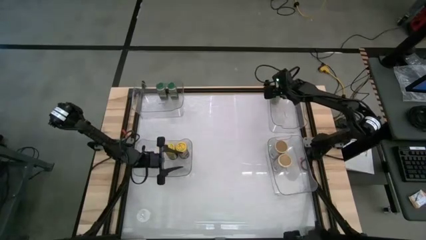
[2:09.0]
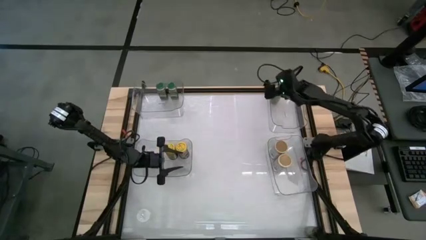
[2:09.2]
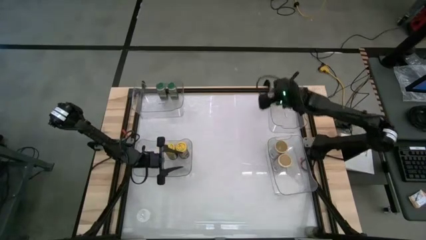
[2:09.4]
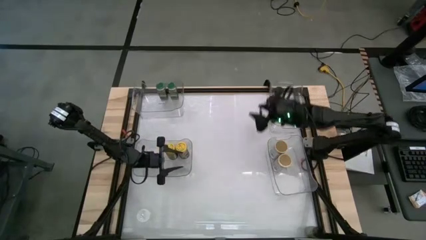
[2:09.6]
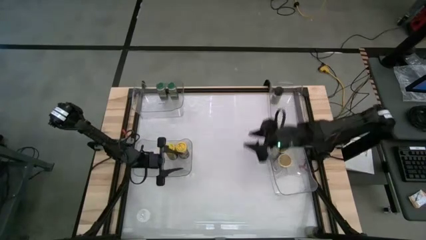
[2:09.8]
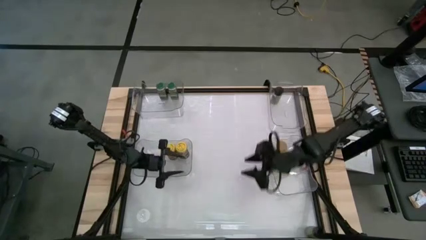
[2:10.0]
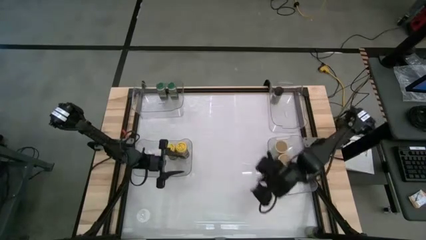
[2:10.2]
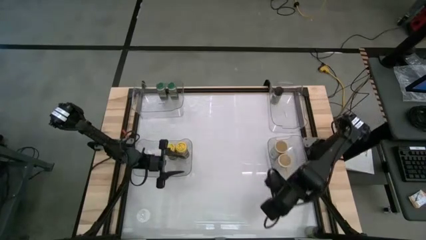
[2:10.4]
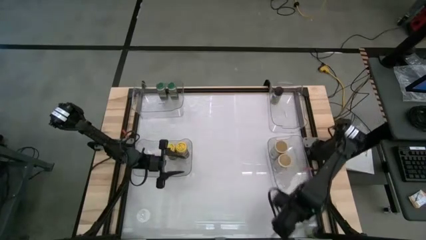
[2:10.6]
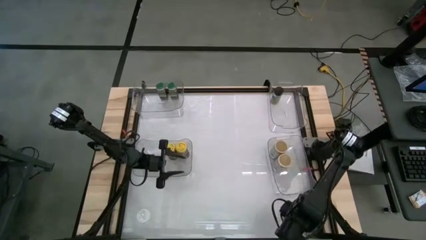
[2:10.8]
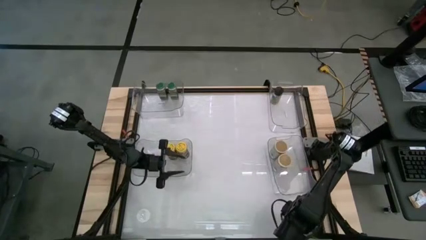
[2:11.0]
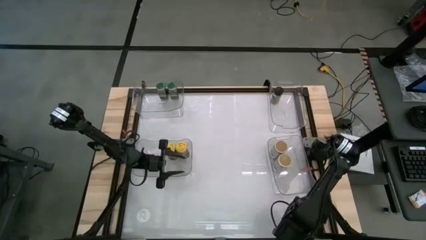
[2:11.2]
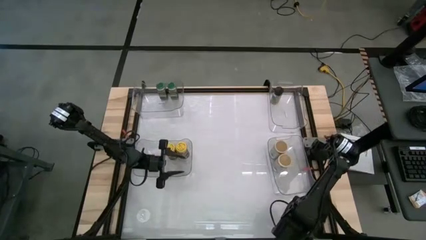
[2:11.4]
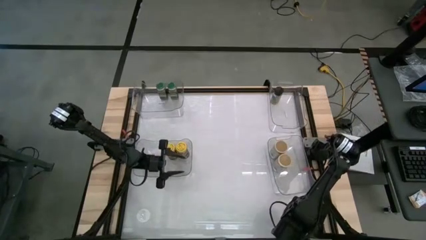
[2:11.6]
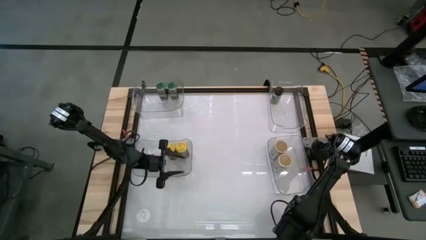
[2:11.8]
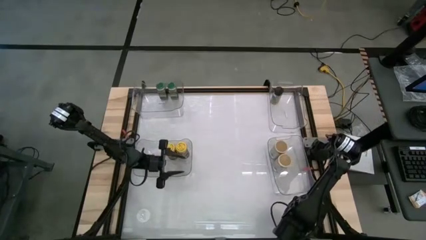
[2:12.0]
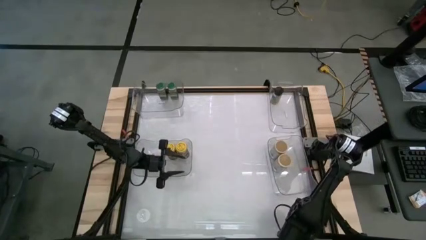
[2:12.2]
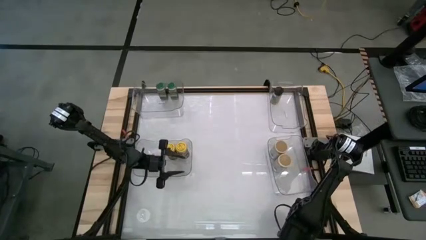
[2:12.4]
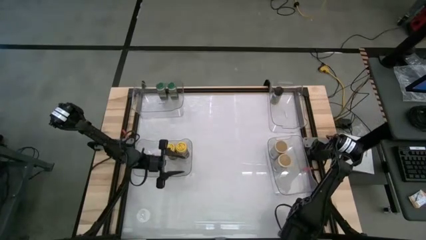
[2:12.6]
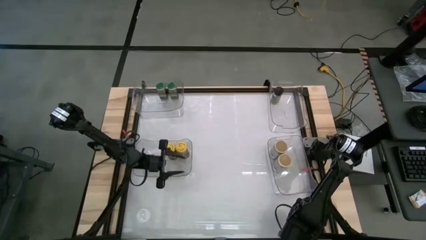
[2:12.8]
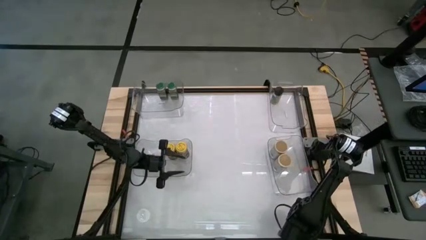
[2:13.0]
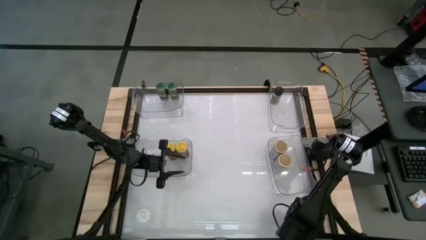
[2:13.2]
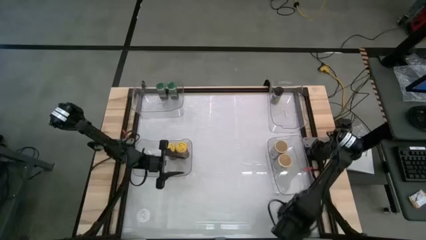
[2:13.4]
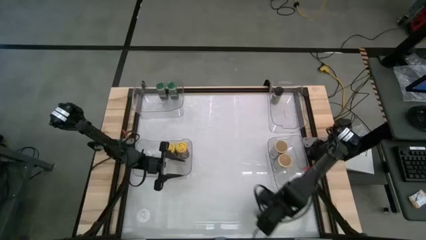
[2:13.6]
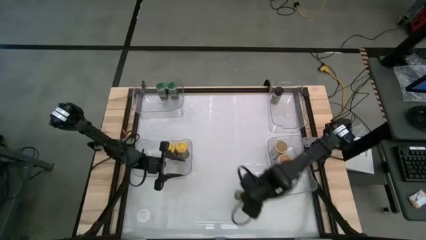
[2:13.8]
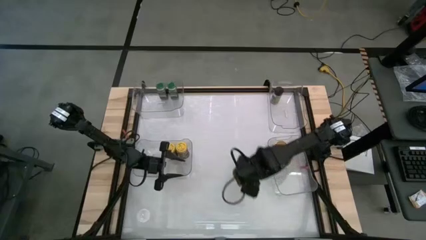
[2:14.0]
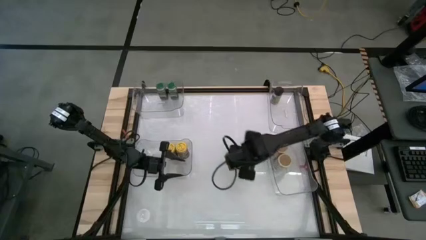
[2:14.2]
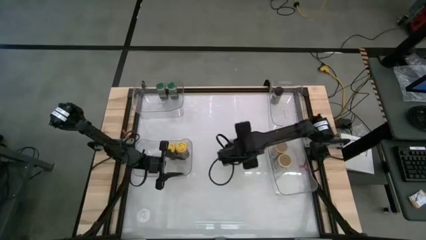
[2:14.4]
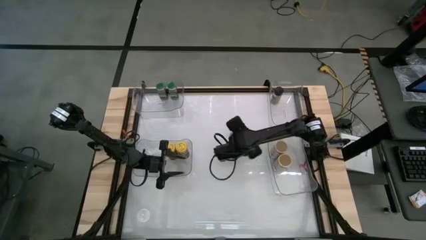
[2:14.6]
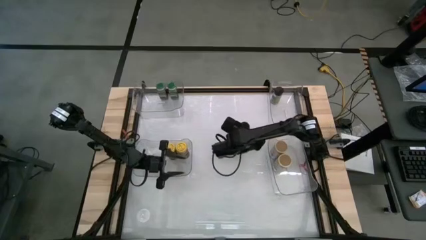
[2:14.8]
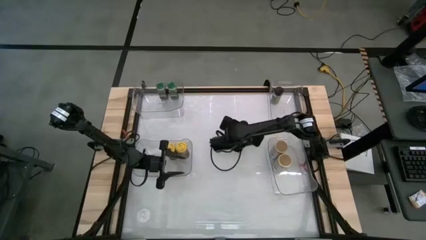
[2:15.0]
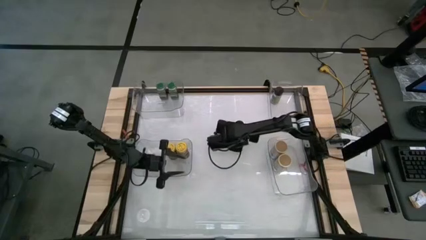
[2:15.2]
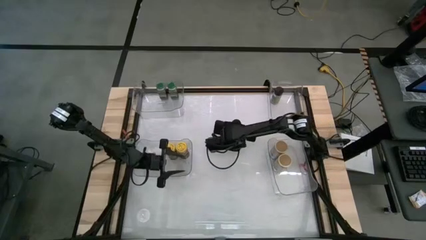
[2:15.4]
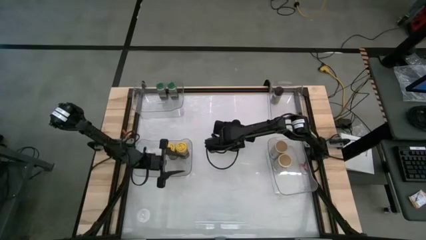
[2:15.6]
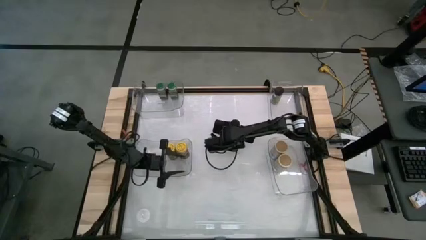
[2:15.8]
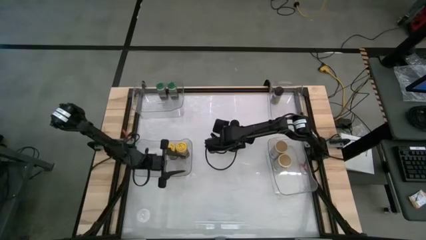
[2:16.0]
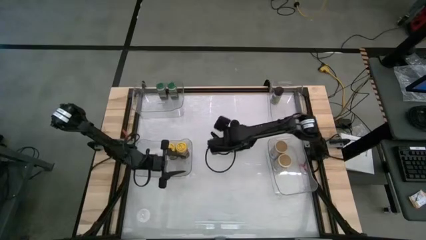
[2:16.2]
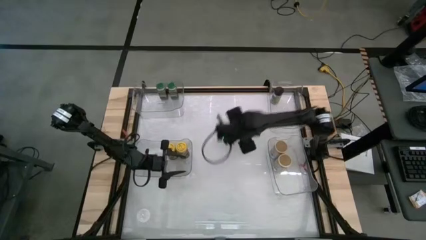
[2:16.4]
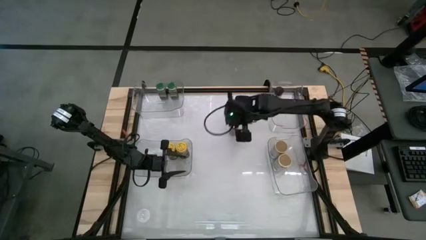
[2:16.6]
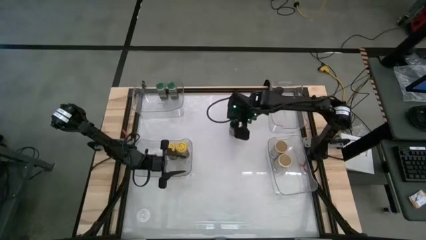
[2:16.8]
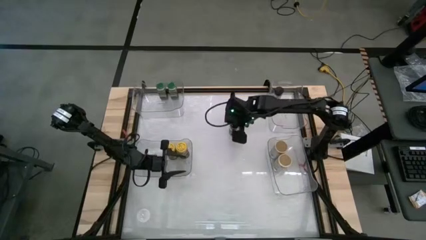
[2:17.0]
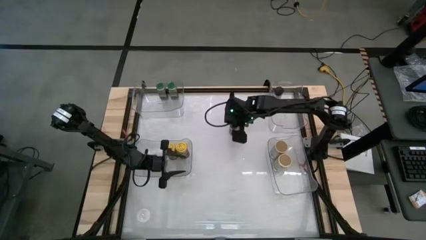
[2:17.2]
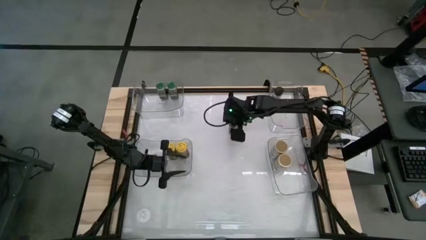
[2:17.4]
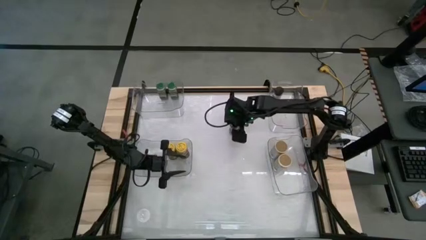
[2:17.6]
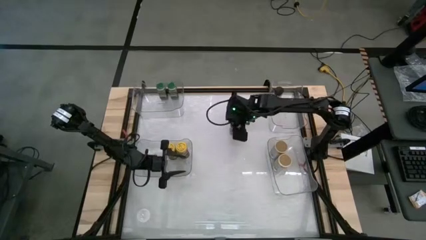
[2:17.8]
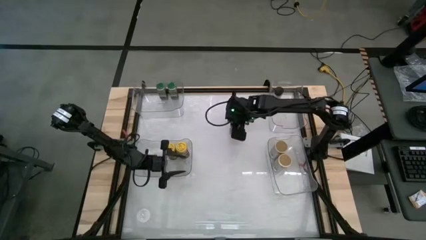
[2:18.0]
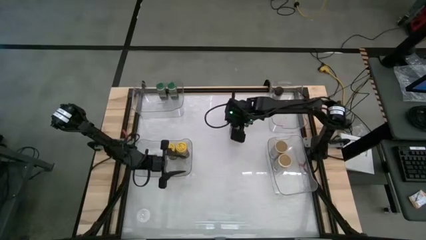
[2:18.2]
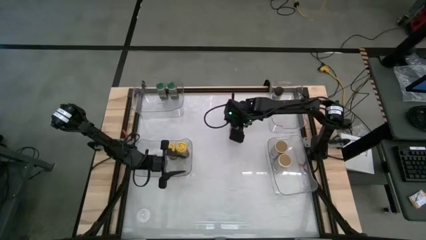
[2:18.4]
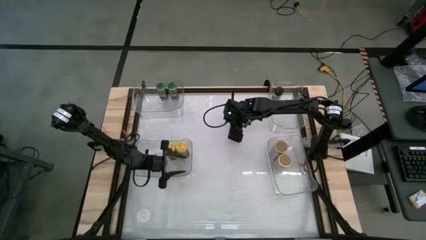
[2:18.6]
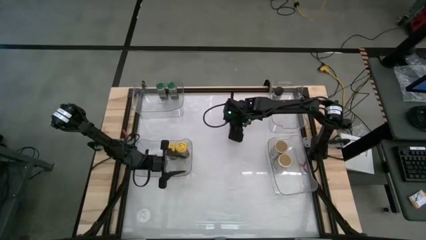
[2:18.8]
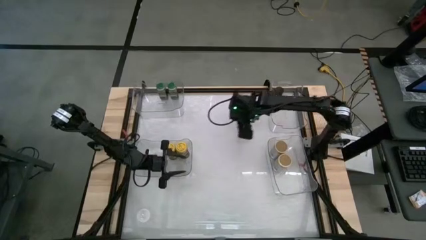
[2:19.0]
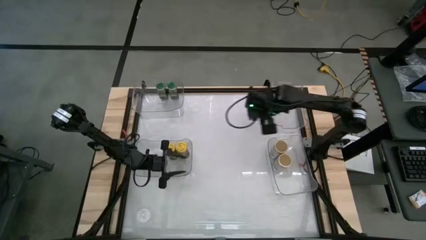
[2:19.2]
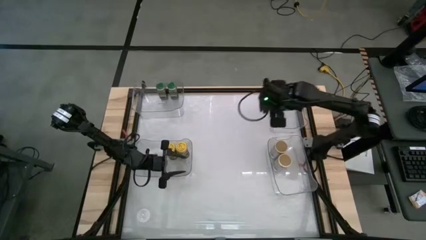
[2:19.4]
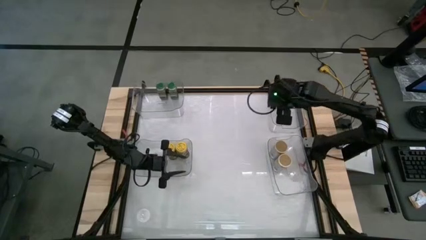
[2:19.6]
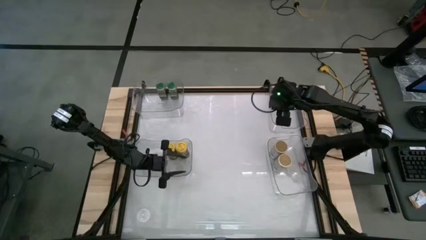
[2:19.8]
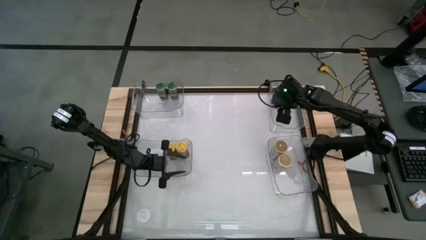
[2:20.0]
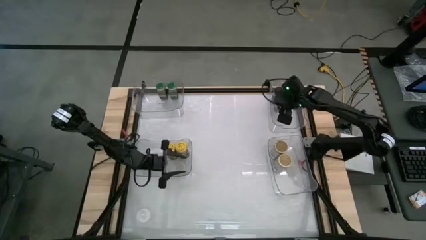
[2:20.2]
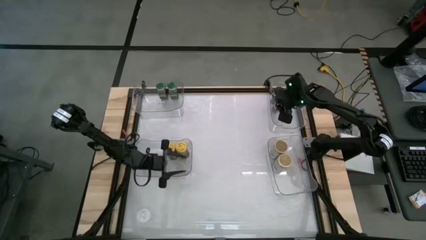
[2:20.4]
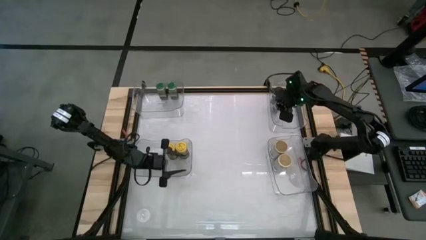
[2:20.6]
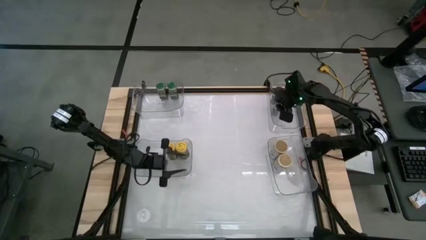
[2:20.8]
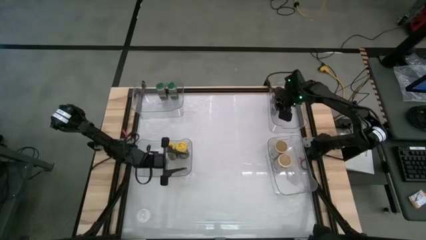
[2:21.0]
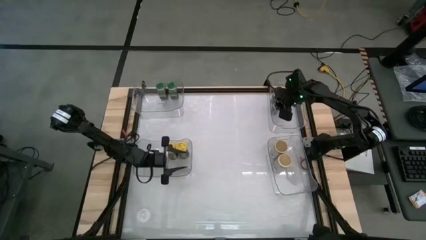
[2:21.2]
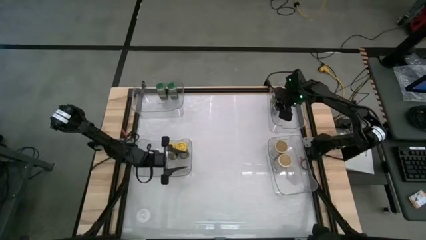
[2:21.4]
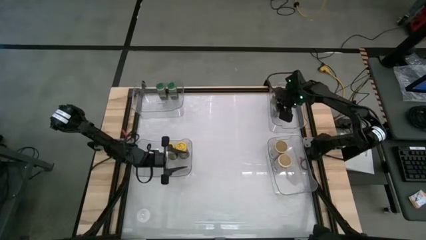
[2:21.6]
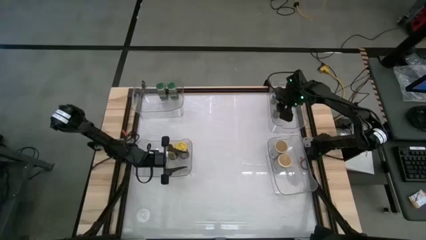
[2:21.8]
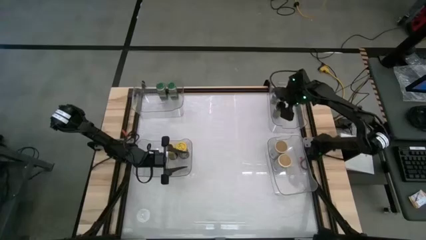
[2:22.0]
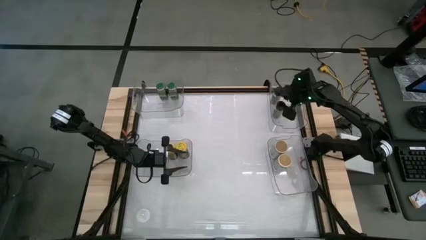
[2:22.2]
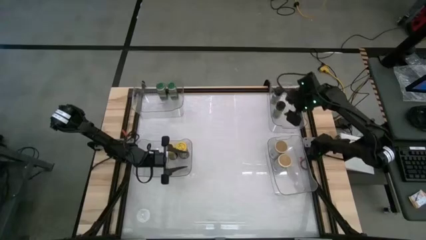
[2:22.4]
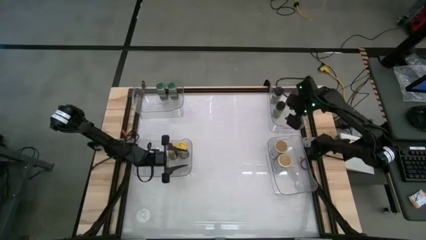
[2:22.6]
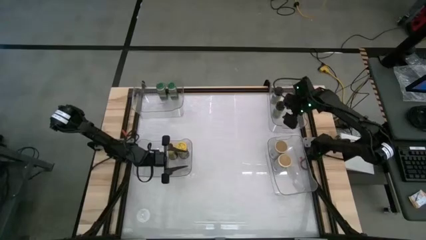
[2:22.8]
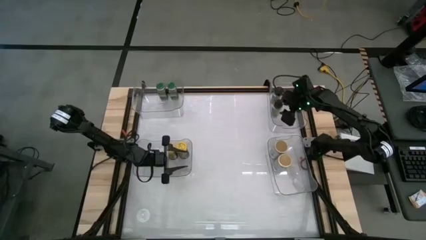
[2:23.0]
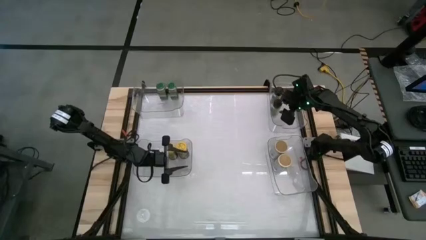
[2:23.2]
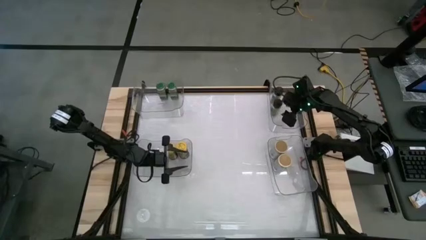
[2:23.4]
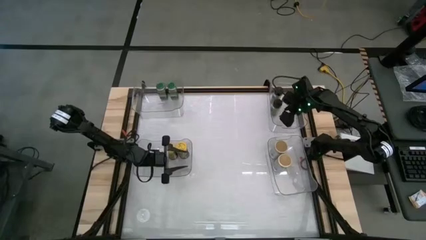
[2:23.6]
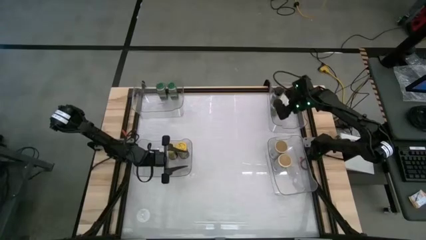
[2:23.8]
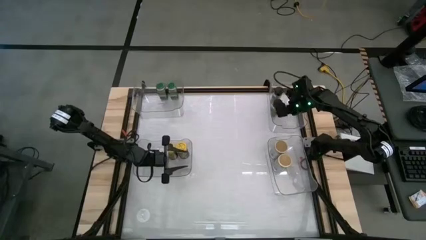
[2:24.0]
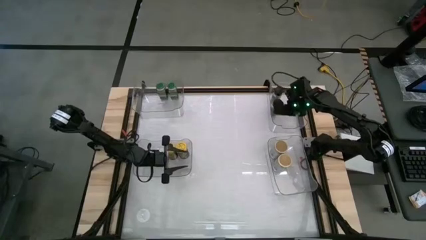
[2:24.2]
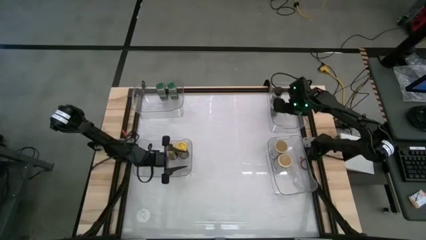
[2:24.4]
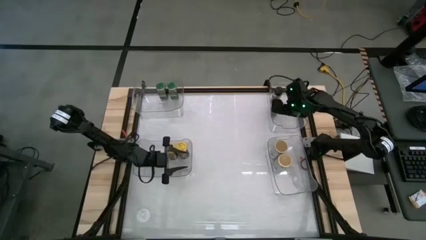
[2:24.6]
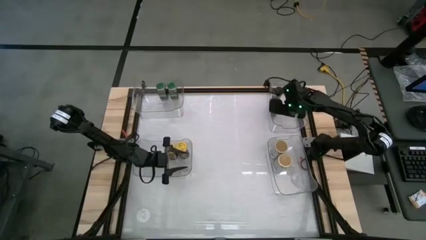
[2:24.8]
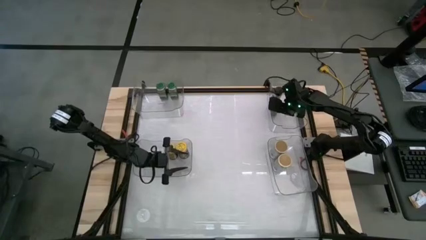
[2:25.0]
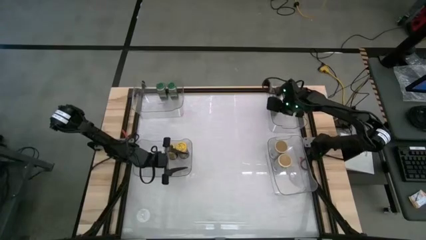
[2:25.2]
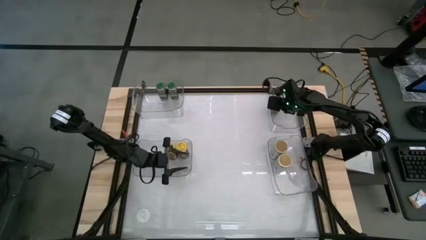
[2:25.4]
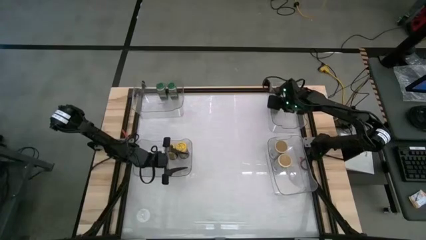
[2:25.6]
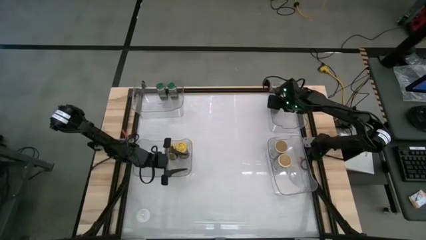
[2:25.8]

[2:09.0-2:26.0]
Task: Sort spices by type
Put the black spice bottle into the top right transparent bin

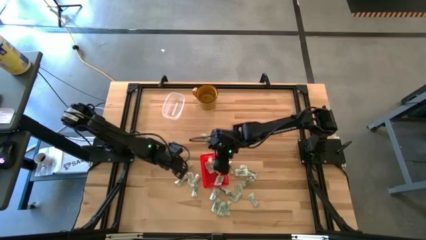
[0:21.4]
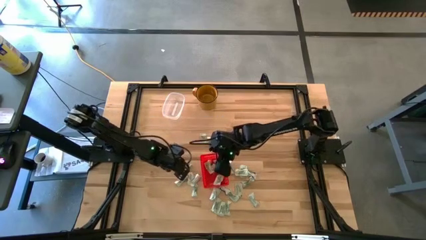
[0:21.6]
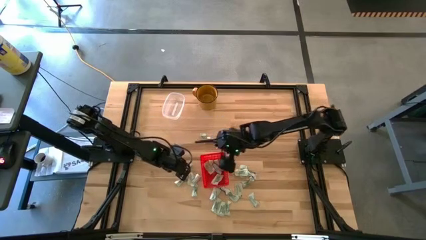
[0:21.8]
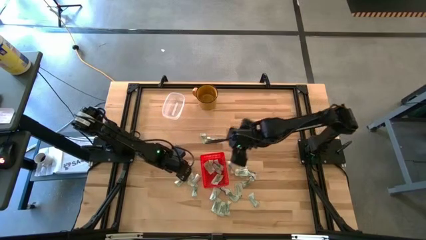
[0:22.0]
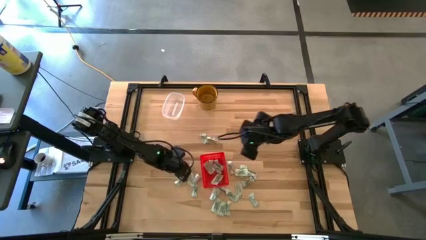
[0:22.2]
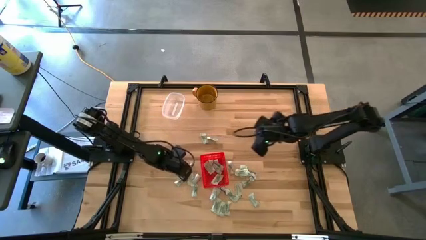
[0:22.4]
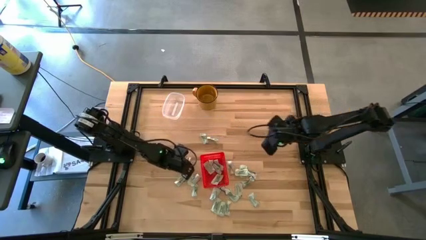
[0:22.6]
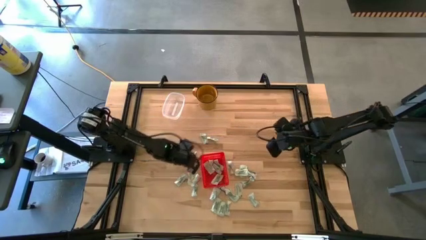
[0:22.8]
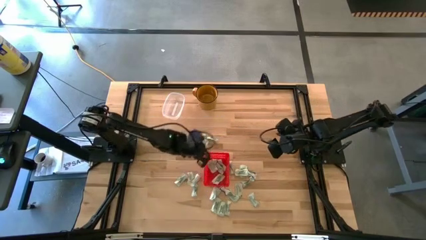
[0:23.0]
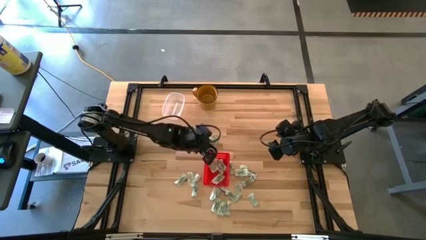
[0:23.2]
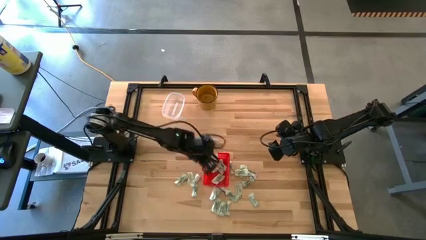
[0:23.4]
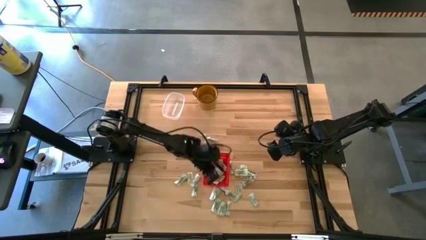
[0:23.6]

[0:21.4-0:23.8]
Task: Pick and place Stevia / Truvia into bins
Put the white stevia packet into the red basket
